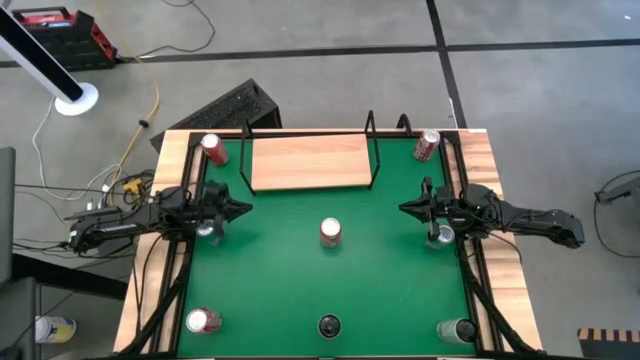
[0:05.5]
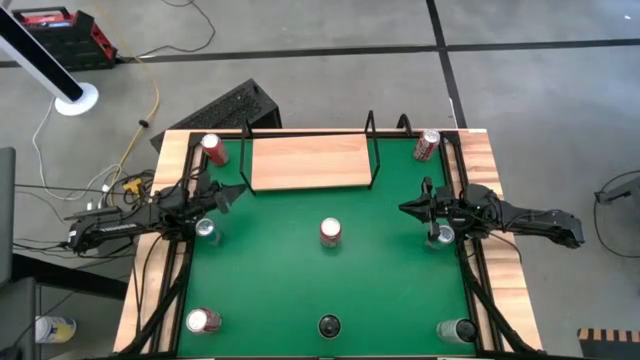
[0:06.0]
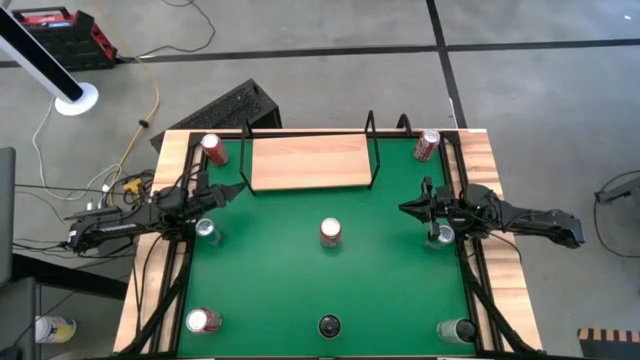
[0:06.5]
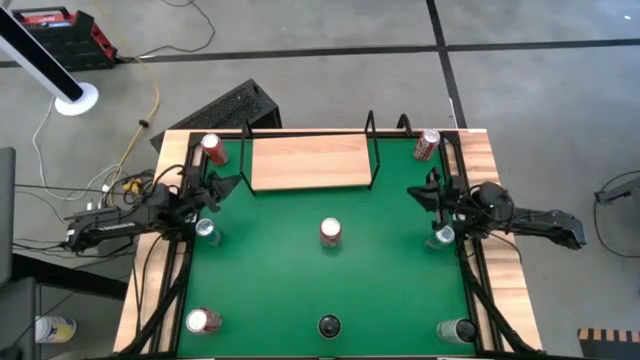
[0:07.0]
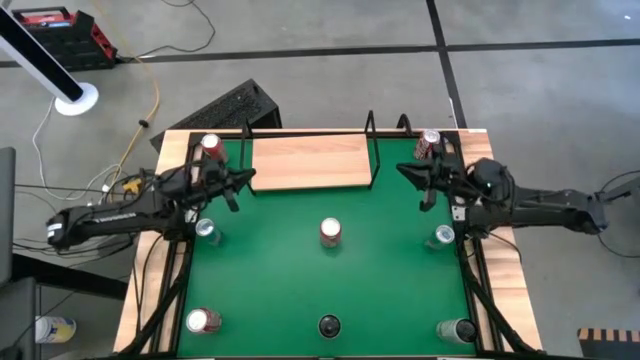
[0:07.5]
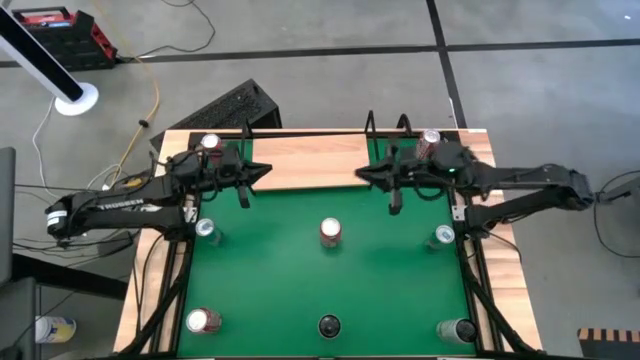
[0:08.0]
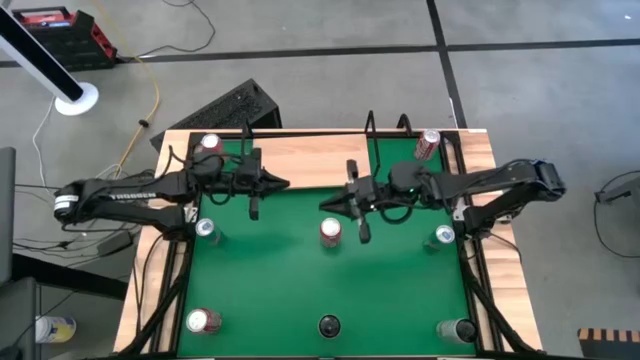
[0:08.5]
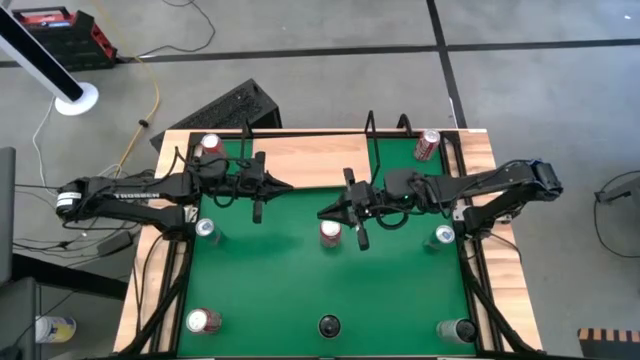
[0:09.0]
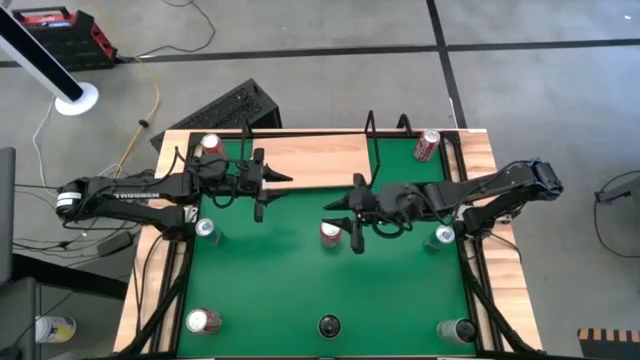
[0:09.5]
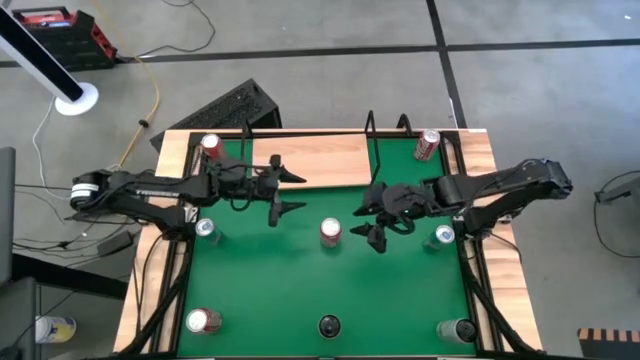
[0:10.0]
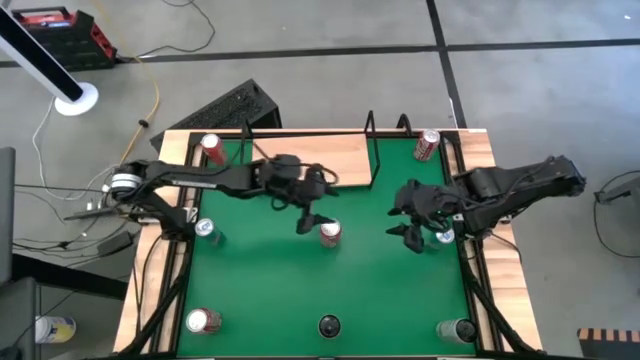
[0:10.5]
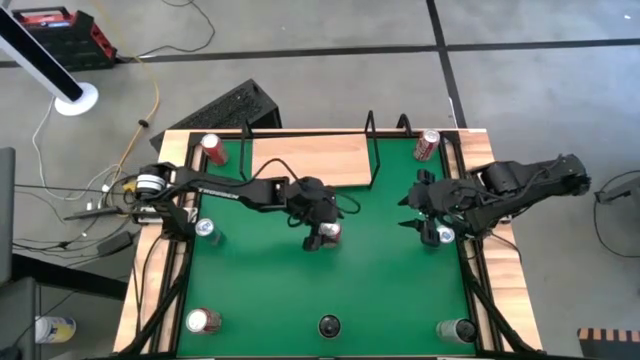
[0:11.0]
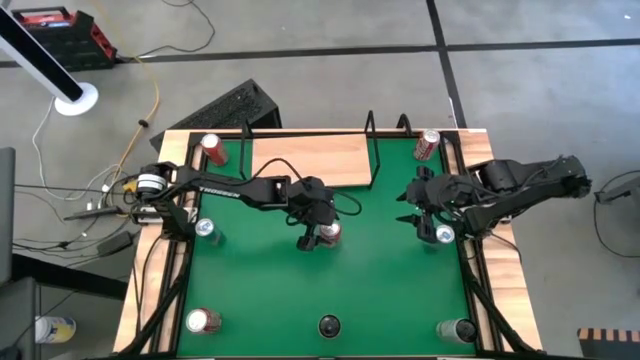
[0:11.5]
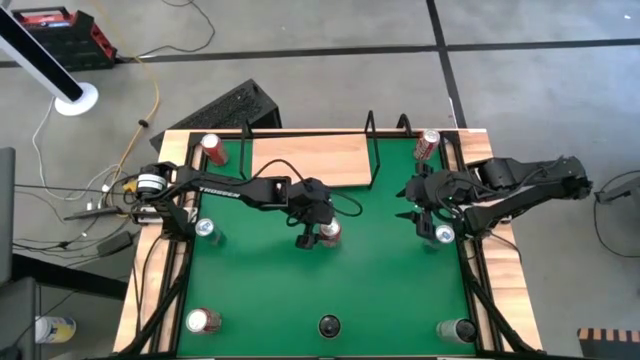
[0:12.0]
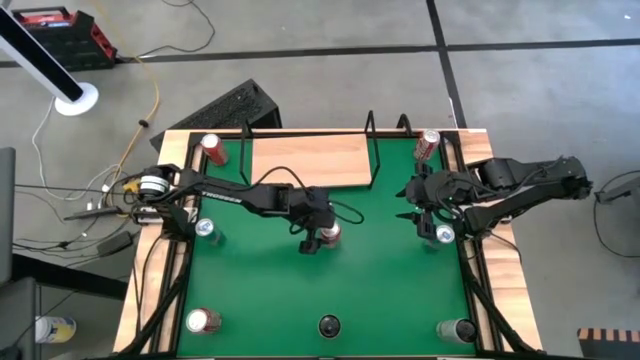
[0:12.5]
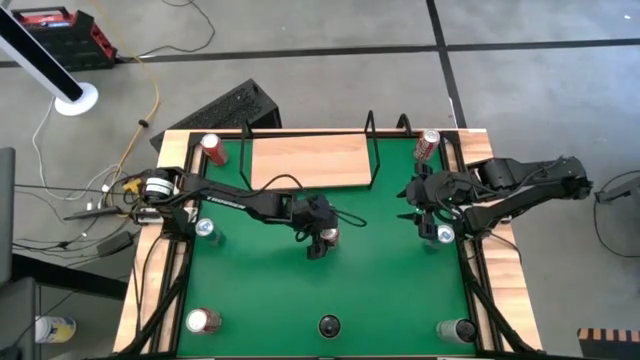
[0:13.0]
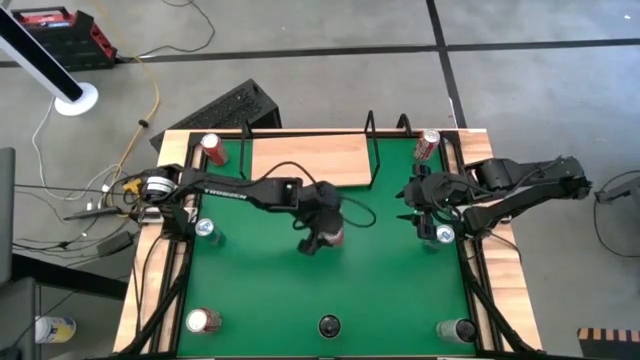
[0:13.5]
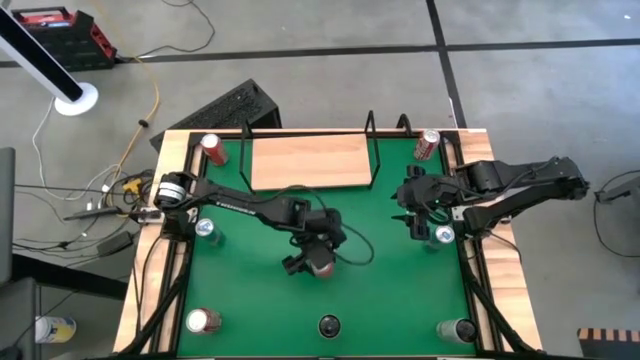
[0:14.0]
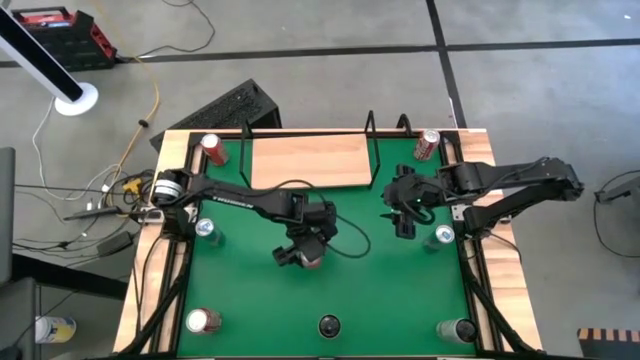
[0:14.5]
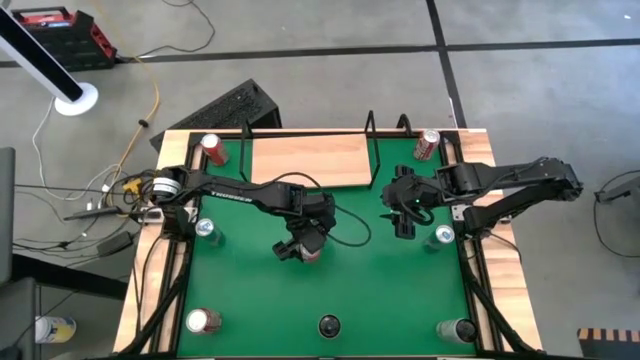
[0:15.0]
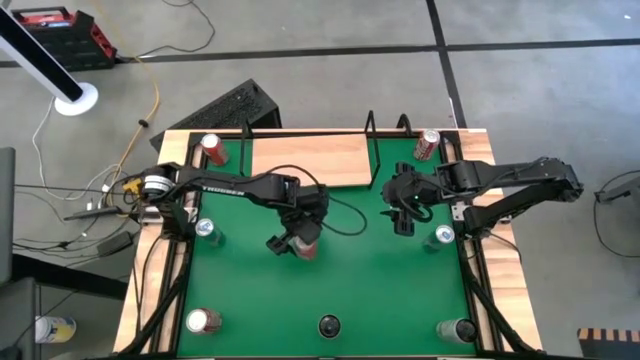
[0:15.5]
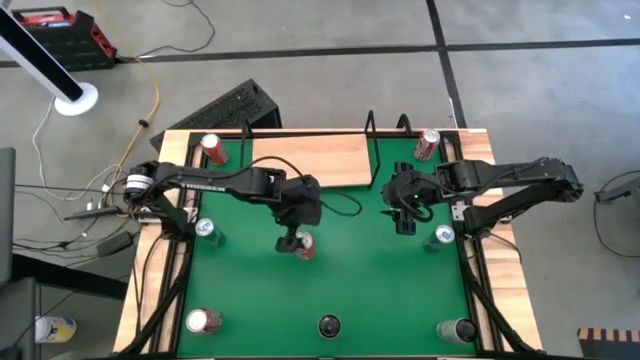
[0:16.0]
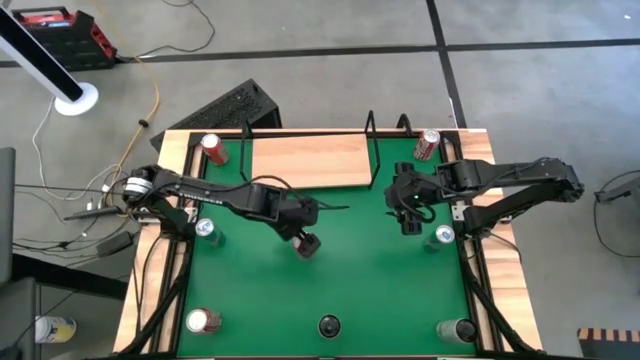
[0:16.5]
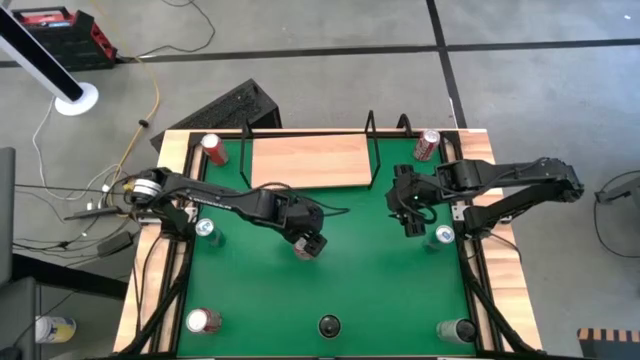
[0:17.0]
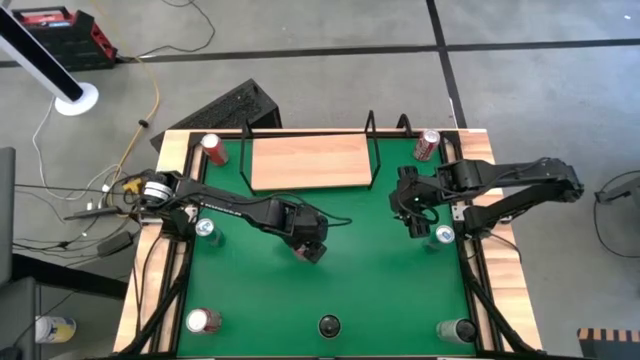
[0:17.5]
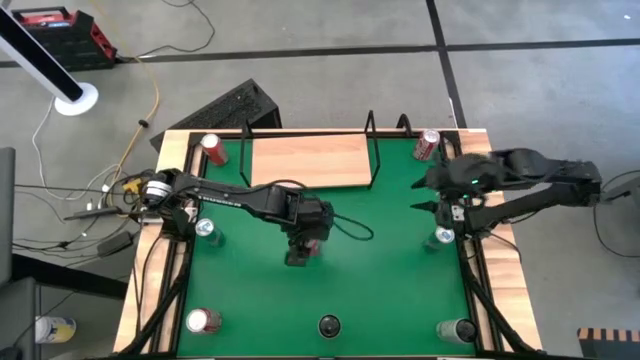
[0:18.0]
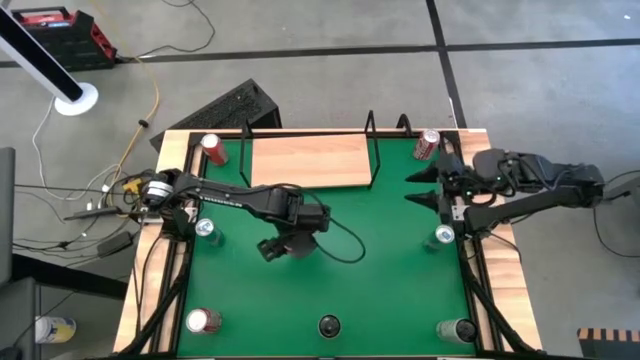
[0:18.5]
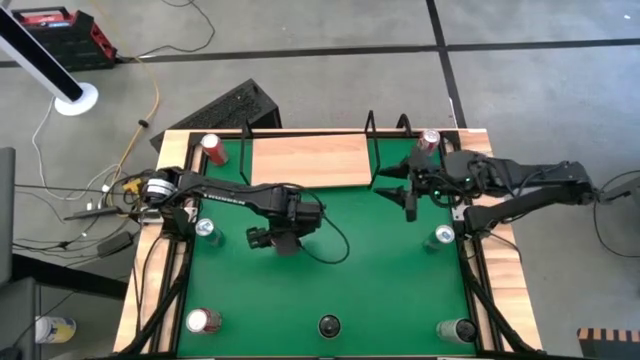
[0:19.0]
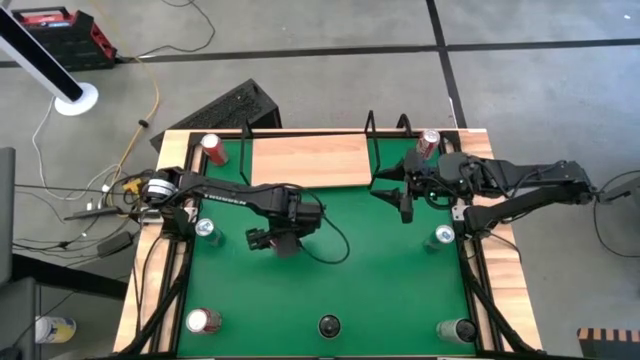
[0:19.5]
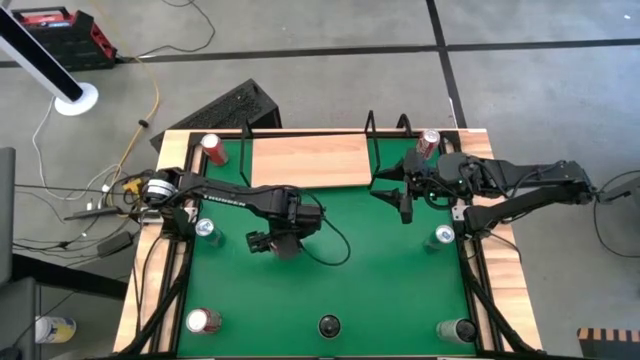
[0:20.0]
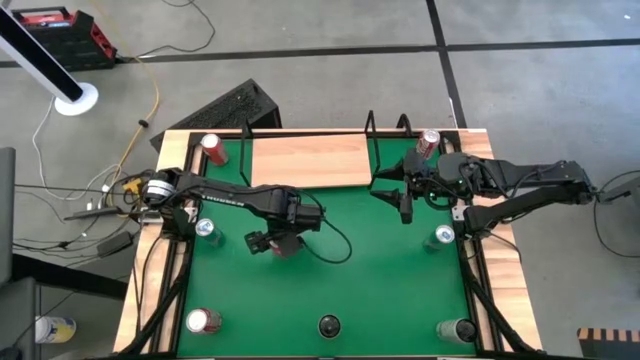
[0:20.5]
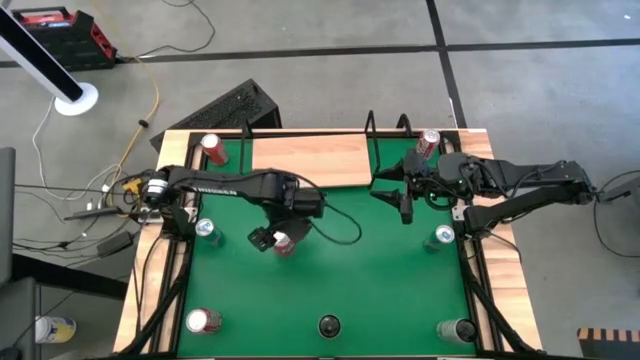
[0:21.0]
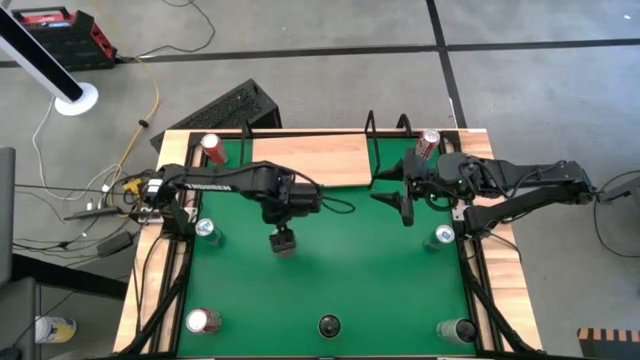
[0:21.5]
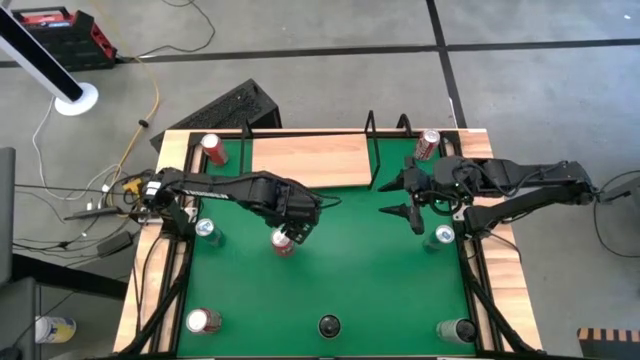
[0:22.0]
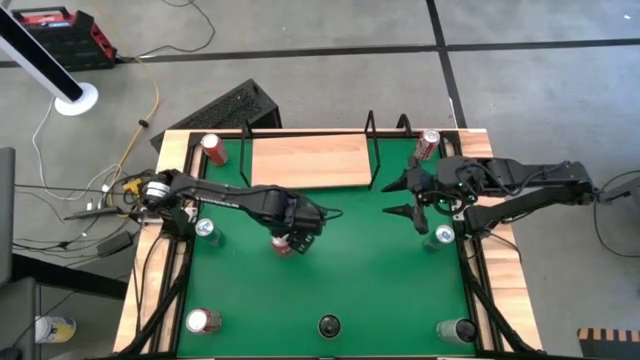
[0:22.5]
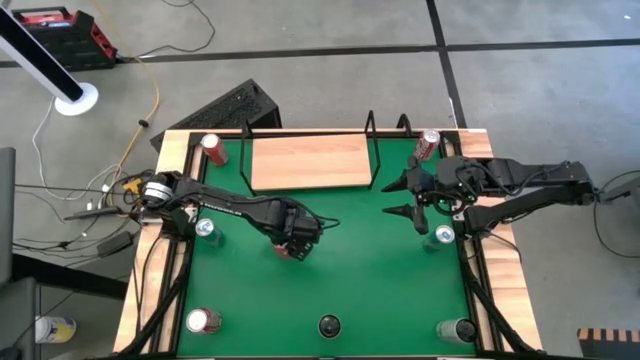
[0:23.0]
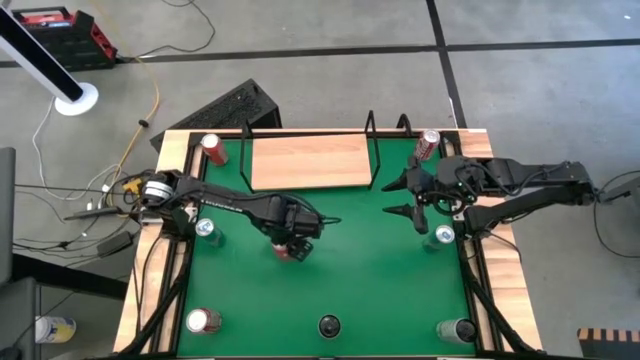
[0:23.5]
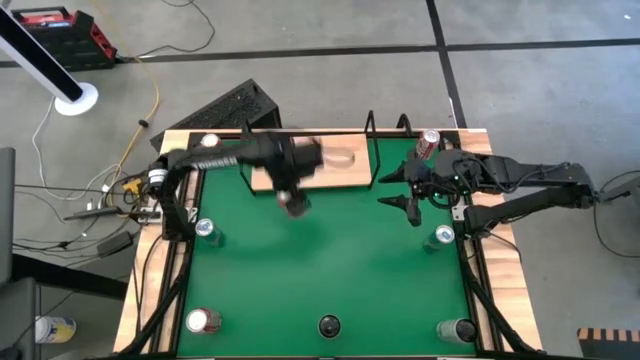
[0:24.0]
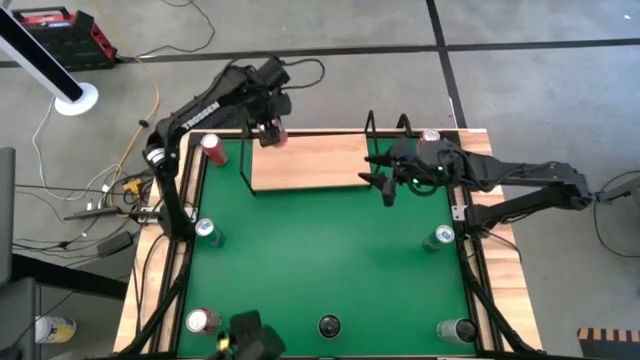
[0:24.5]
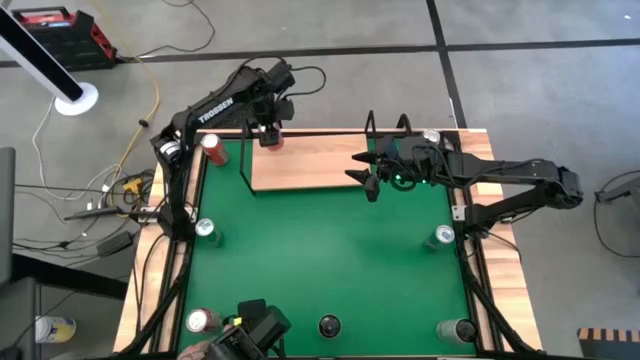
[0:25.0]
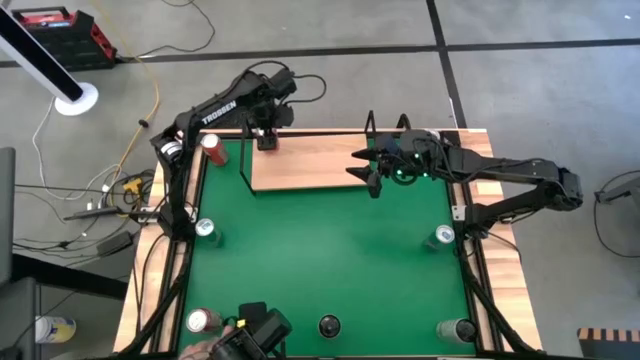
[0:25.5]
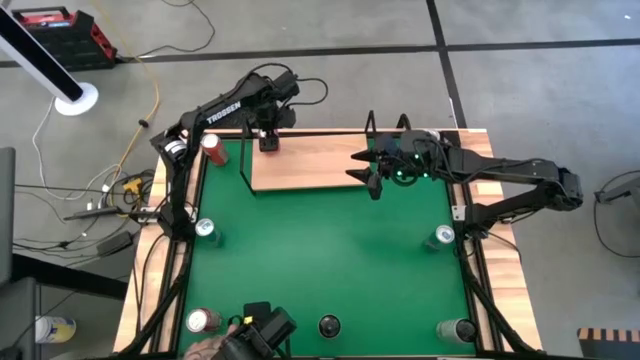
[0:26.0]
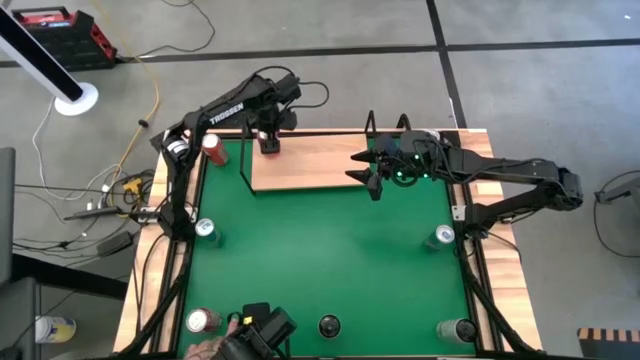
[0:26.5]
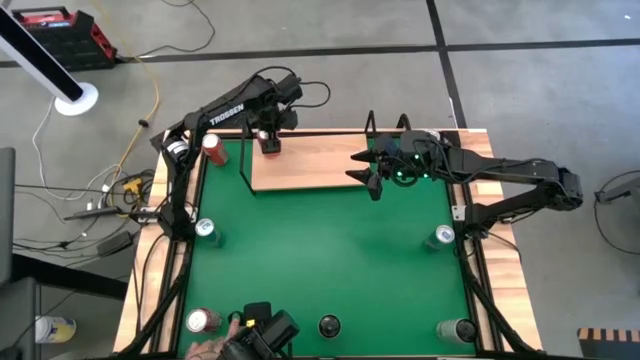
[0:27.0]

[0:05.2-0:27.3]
Task: Place canned beverage on shelf
Put the center orange soda can on the shelf
